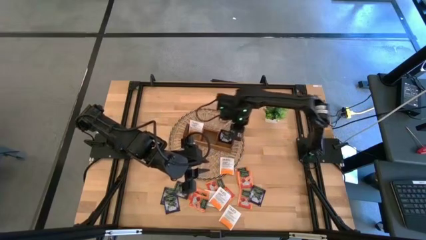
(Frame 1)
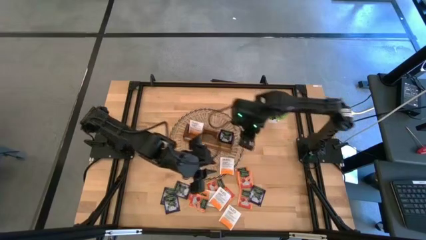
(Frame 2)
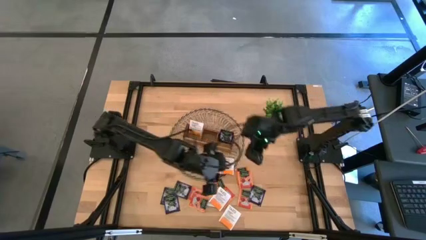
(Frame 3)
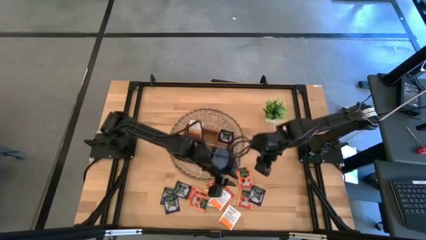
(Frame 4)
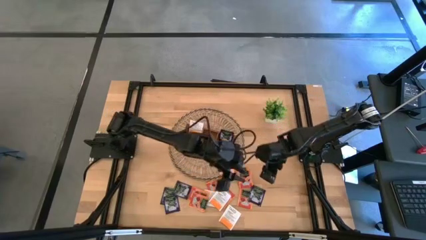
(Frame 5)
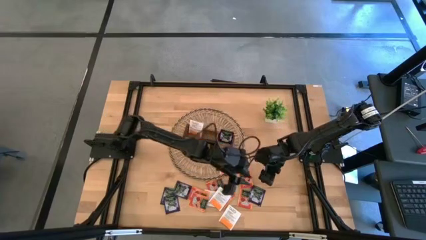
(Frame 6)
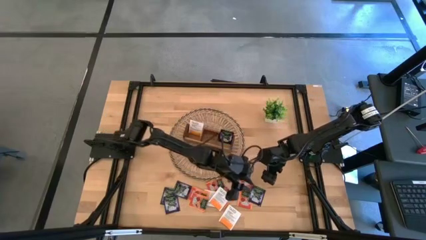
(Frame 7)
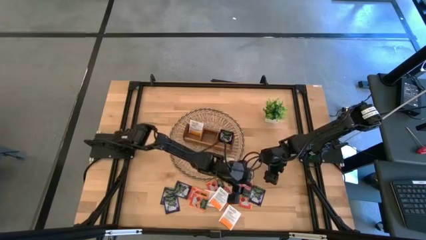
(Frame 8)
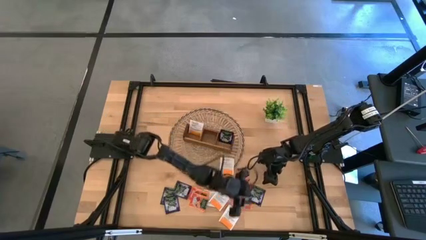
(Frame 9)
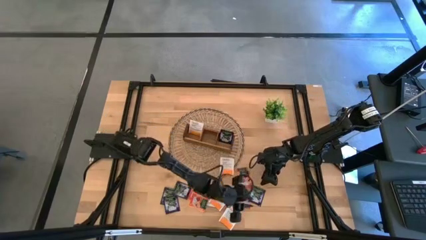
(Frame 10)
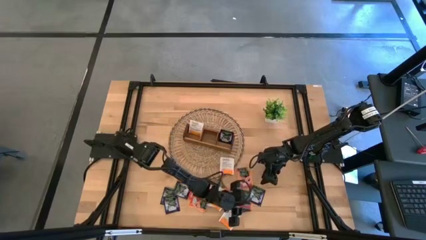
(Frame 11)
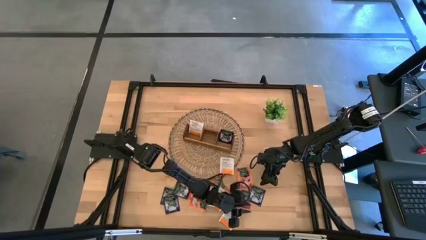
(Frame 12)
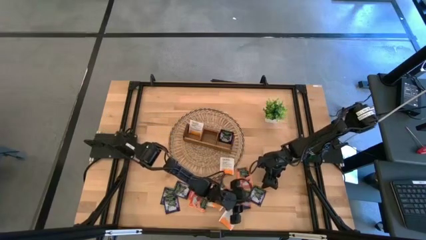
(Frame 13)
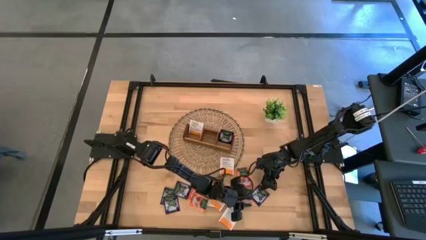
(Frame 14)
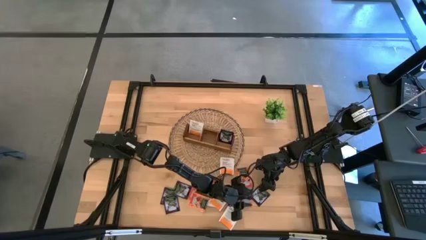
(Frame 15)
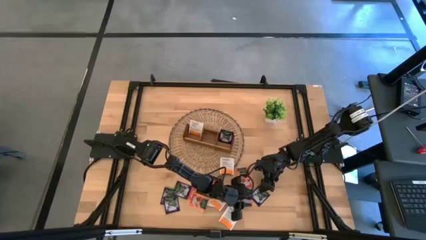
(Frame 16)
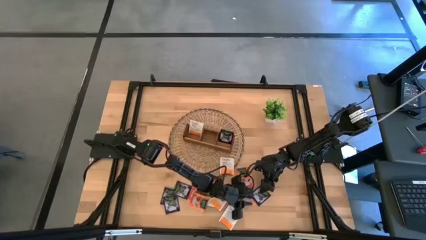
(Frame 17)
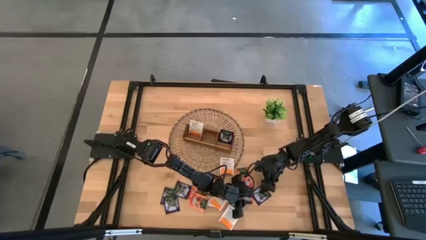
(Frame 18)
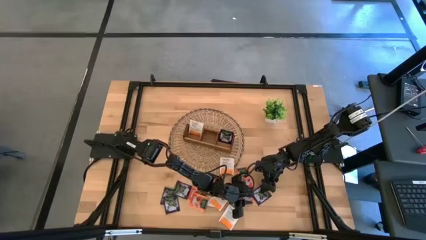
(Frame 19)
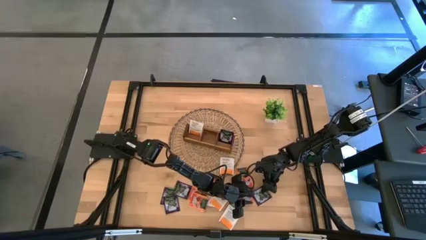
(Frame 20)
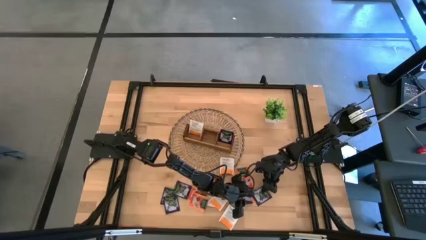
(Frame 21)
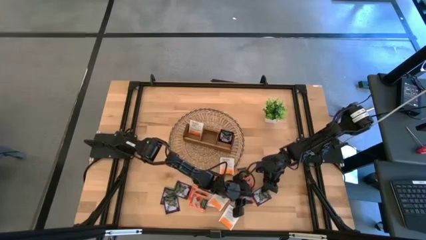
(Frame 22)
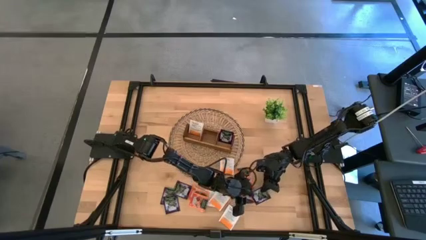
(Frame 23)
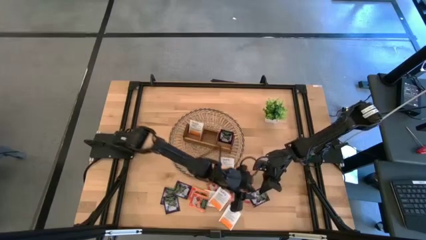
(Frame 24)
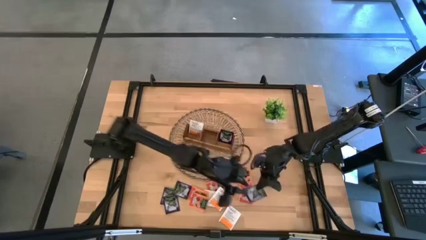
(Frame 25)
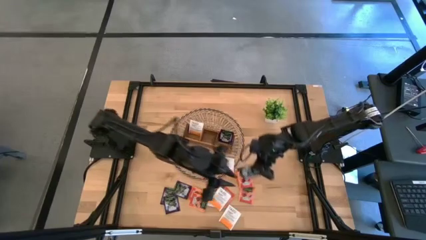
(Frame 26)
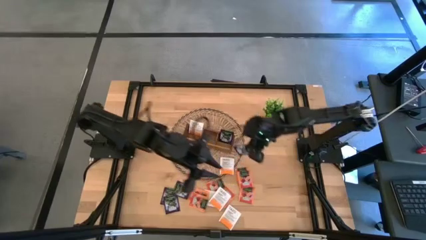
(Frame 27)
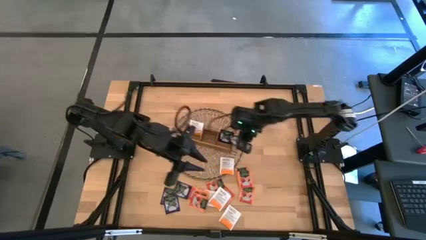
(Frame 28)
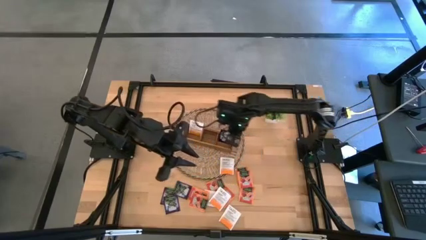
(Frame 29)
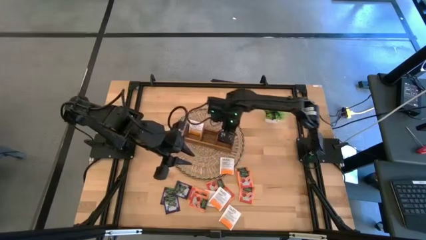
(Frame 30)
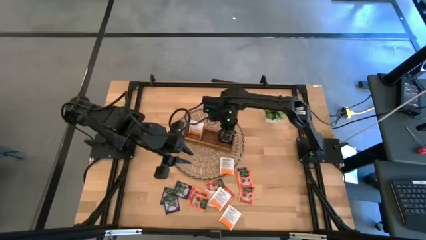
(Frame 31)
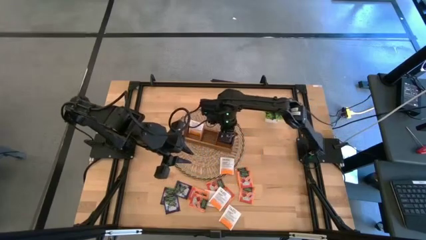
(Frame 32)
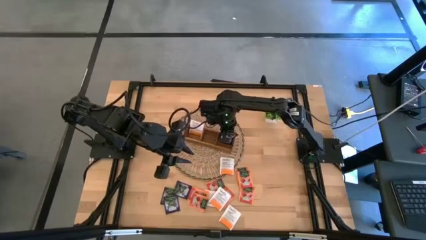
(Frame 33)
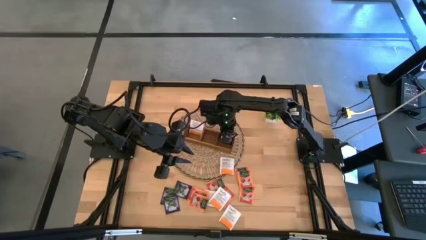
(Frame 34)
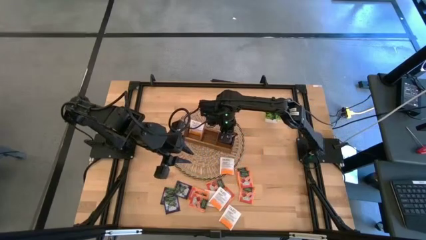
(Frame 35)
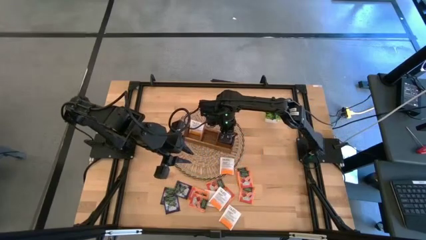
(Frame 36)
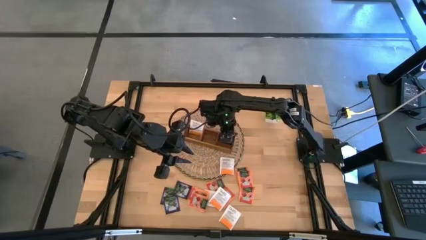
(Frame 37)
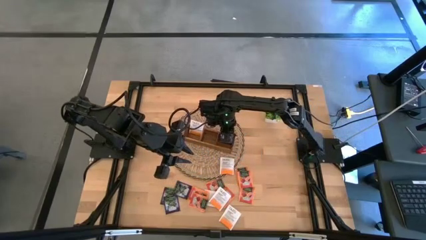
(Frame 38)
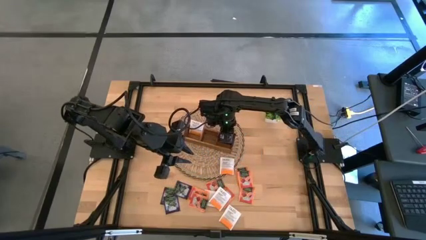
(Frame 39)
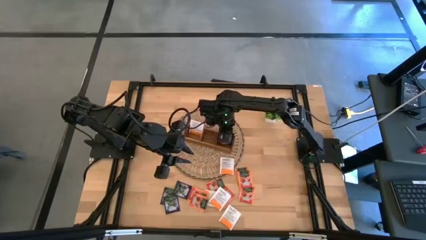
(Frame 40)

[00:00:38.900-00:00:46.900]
Task: Pick & Place Tea
Put the purple tea bag into the right section of the wooden organizer

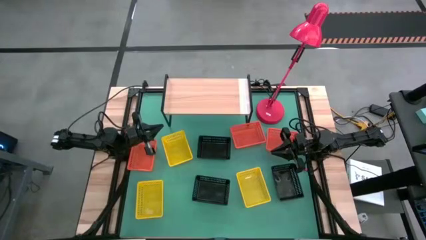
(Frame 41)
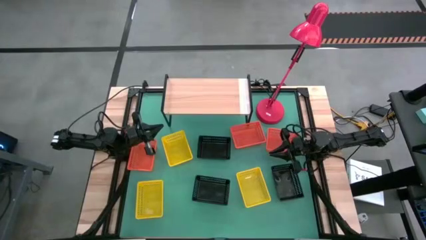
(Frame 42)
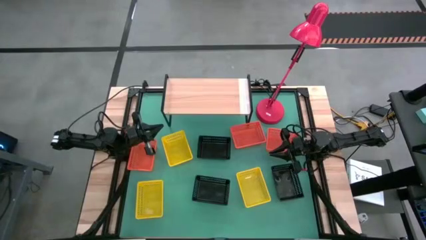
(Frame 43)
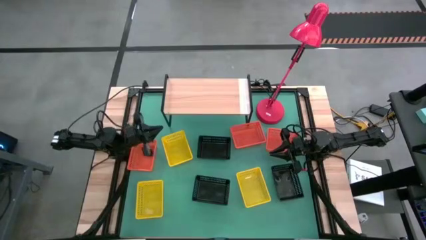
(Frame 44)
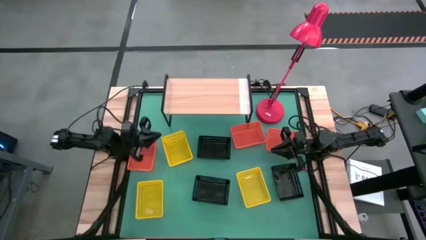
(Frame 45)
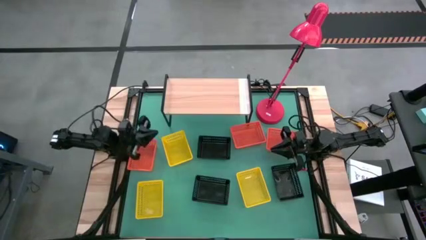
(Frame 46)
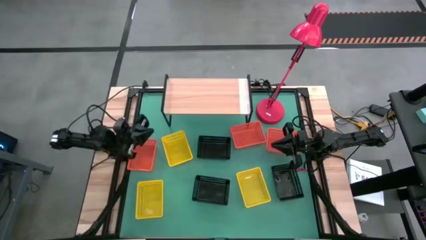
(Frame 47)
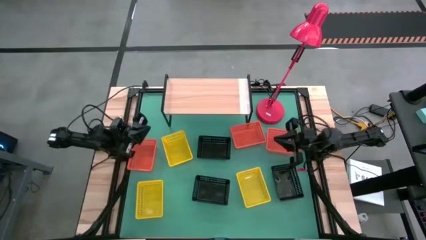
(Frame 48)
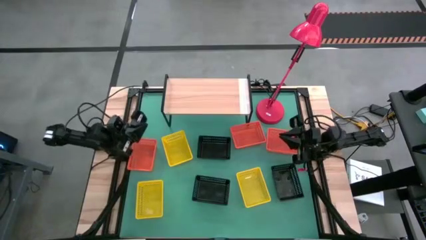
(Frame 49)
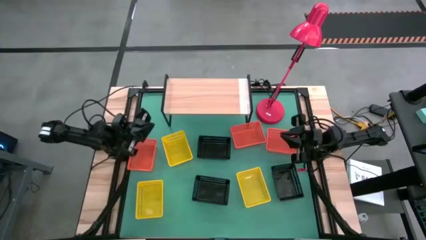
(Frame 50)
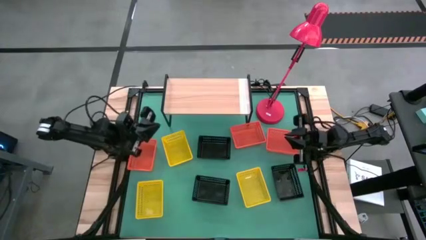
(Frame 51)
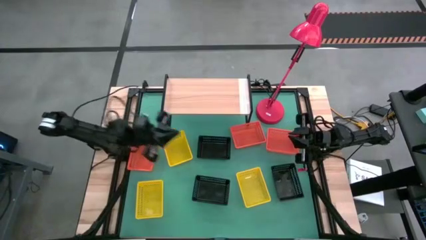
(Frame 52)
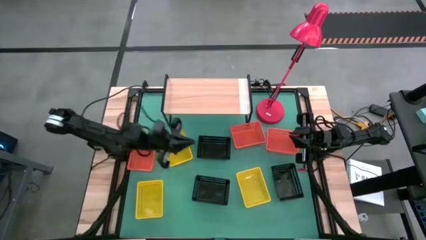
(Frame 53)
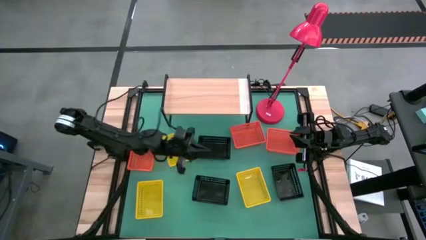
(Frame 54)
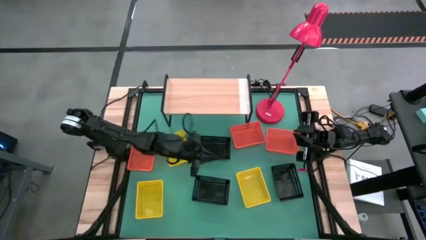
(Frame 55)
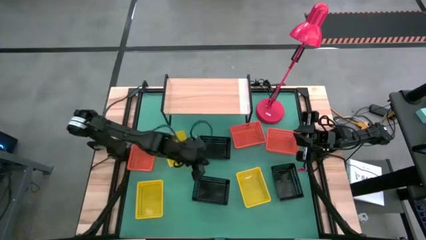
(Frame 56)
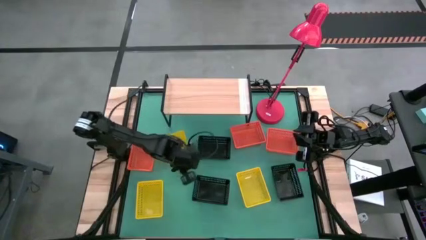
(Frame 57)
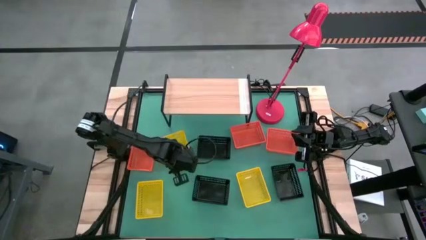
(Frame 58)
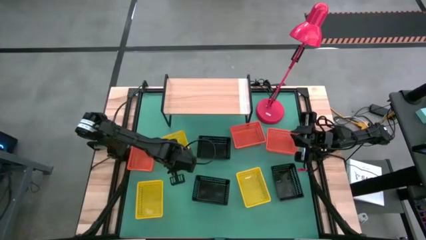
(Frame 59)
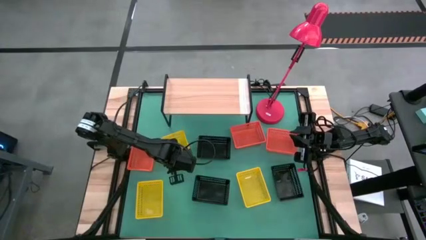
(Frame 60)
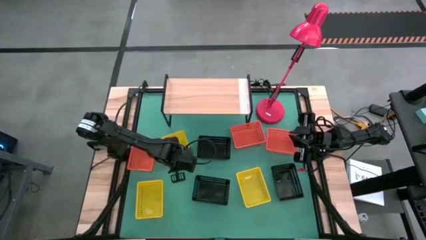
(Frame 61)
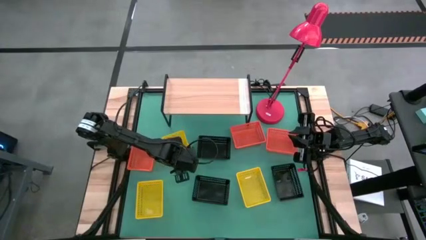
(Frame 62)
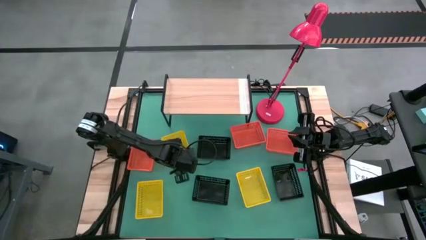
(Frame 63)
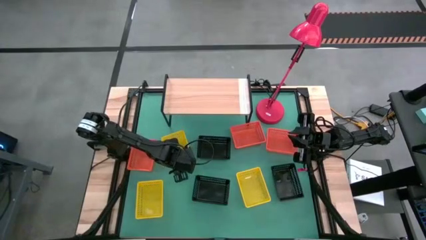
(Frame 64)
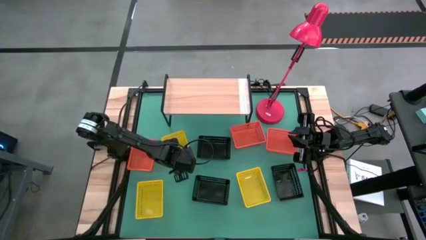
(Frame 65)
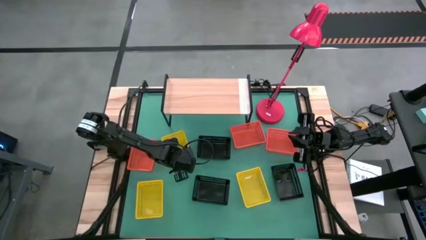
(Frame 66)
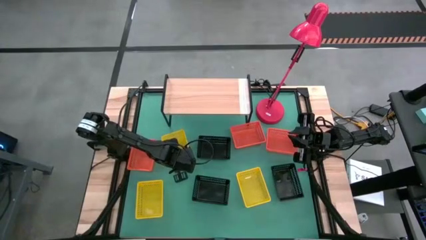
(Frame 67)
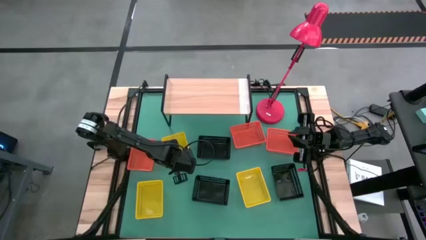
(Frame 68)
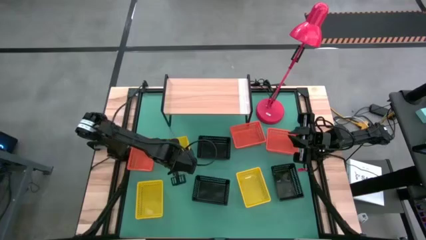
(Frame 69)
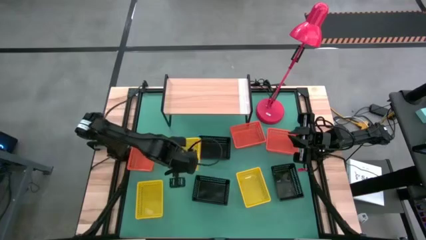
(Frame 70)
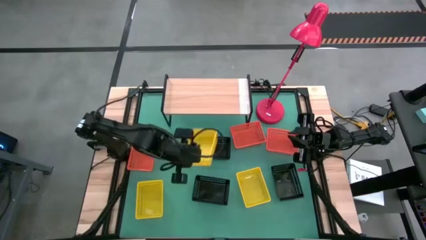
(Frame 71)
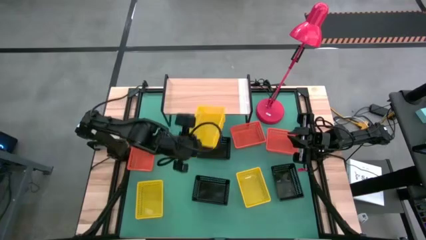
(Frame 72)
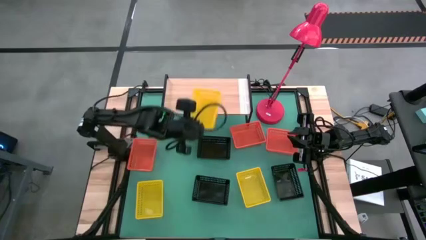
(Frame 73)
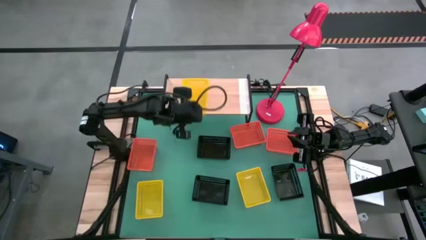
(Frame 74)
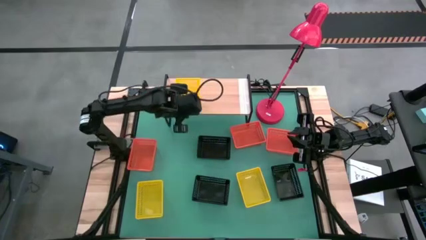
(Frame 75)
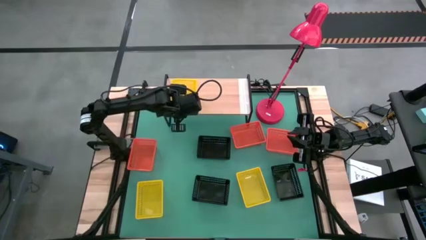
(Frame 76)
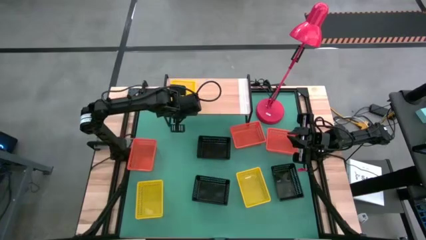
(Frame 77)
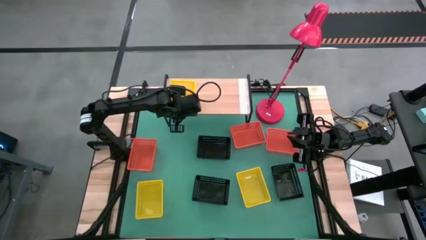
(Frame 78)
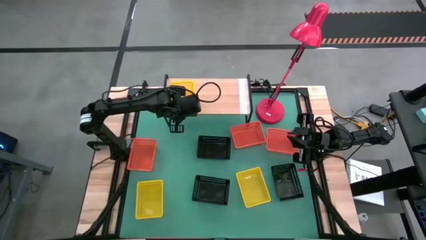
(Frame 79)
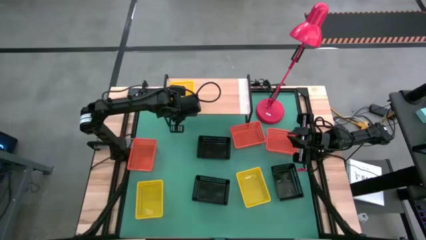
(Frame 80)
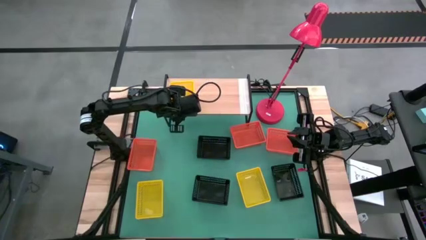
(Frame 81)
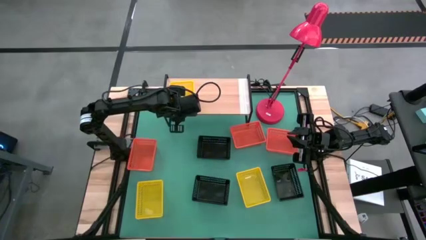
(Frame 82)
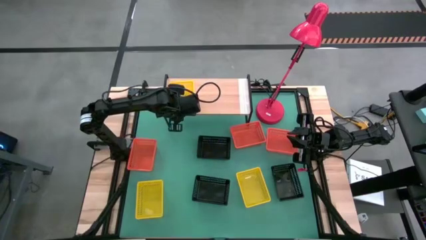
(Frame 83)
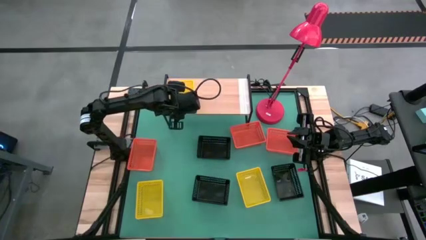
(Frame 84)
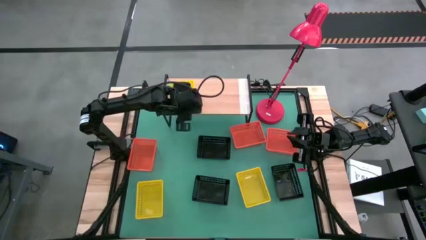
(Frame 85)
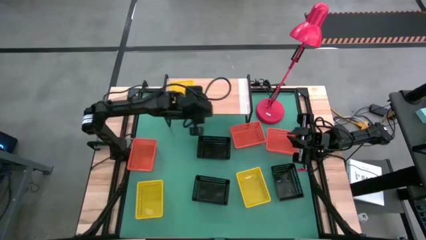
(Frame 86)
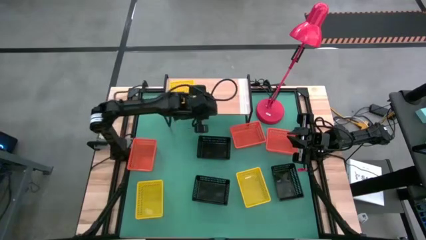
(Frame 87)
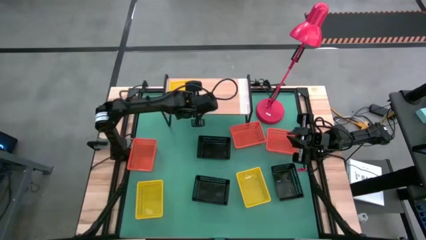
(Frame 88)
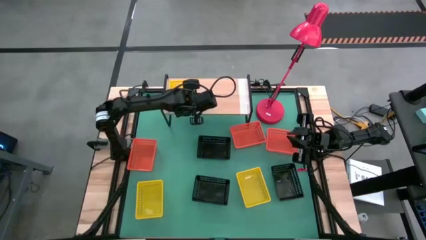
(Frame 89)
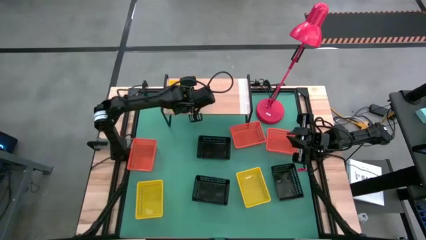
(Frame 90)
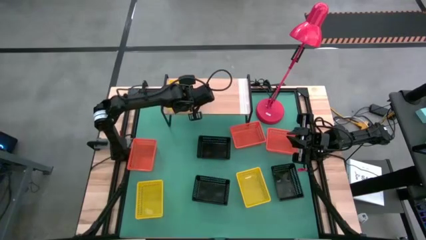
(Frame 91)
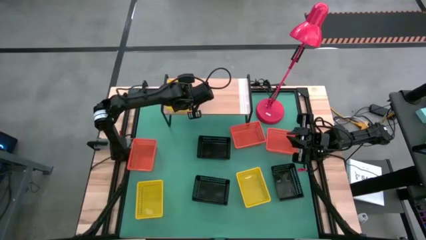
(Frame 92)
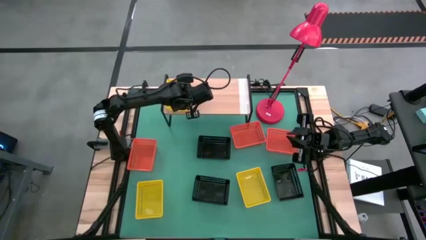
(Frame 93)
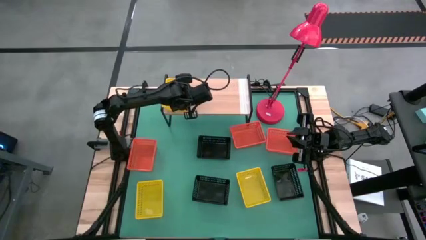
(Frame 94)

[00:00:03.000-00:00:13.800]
Task: Stack baskets on shelf by color
Put the top yellow bin on the shelf
